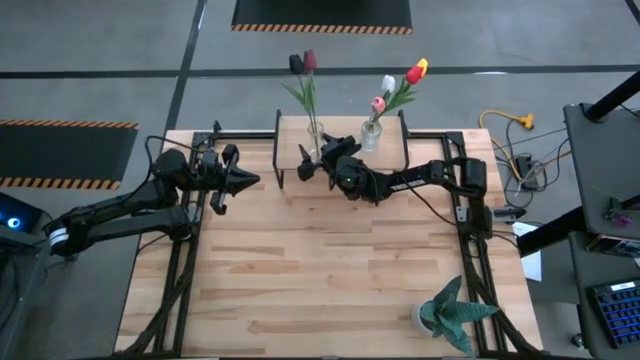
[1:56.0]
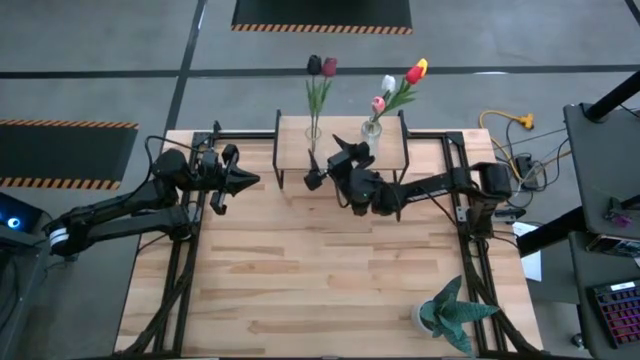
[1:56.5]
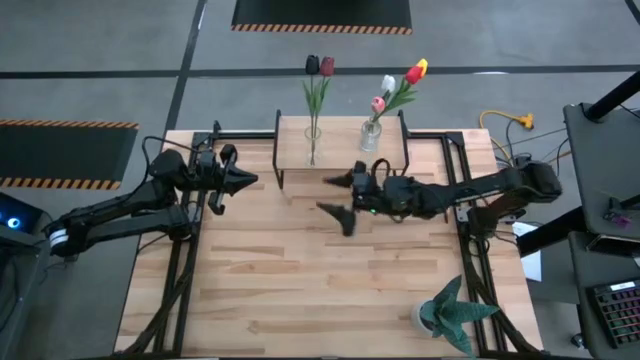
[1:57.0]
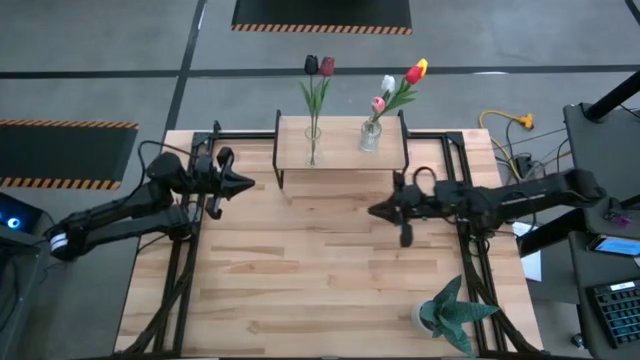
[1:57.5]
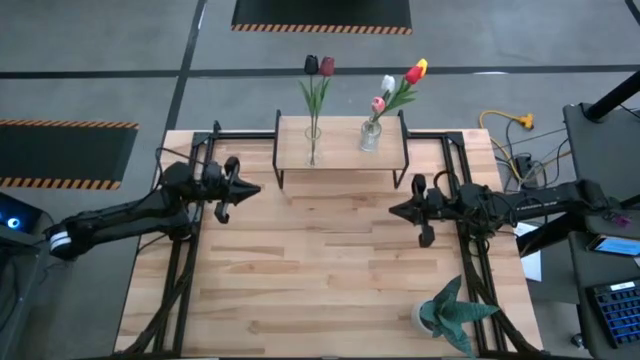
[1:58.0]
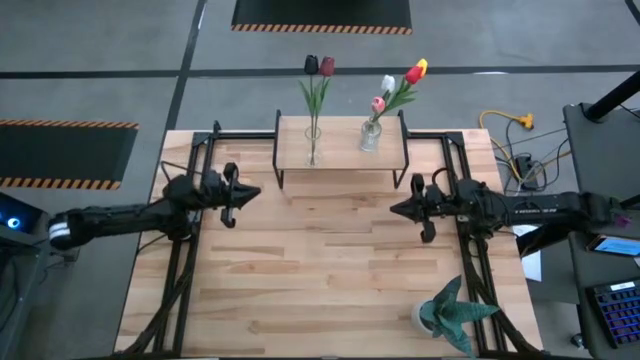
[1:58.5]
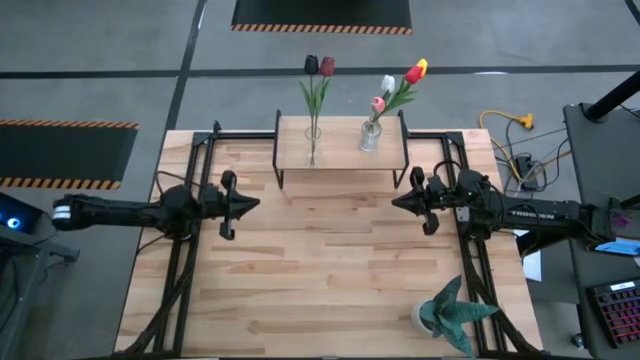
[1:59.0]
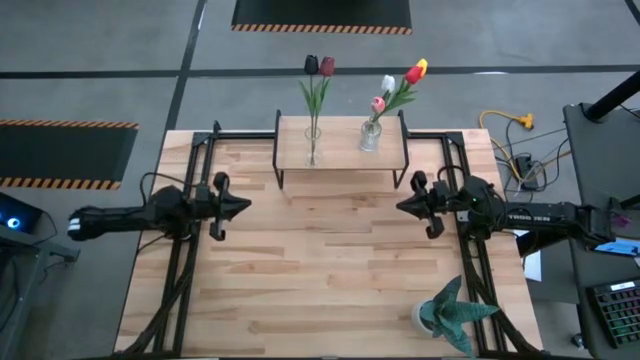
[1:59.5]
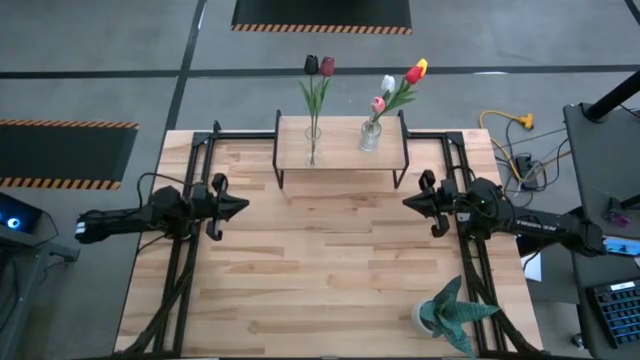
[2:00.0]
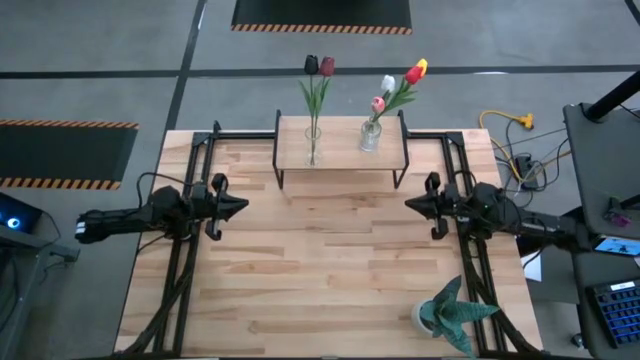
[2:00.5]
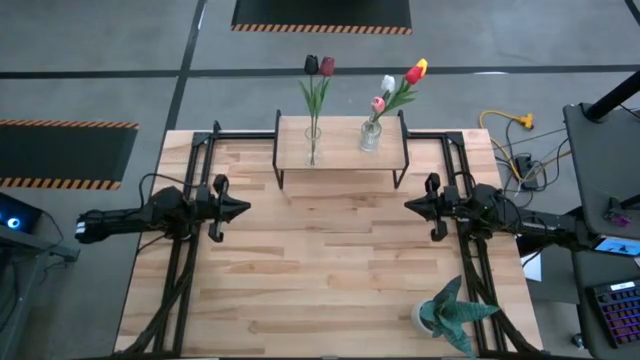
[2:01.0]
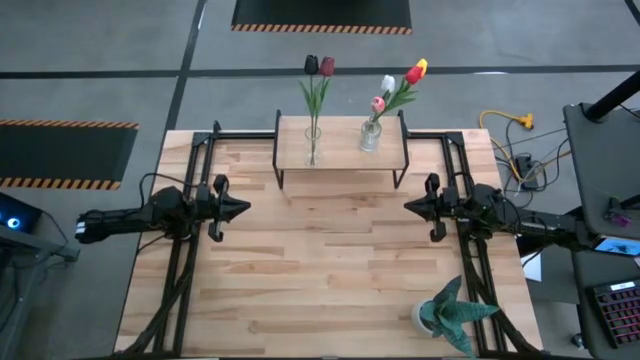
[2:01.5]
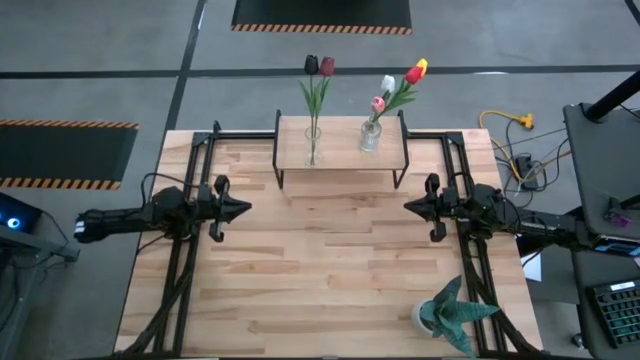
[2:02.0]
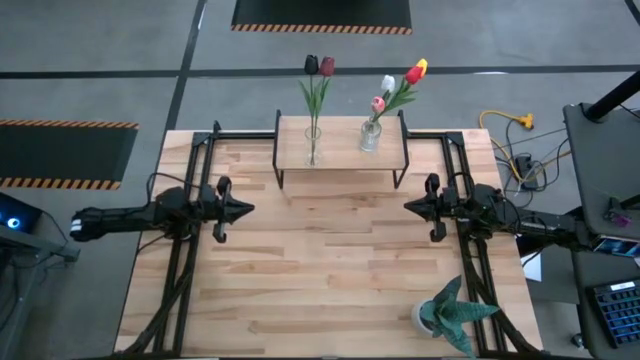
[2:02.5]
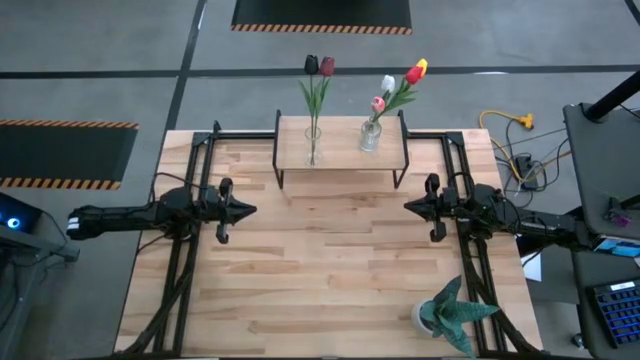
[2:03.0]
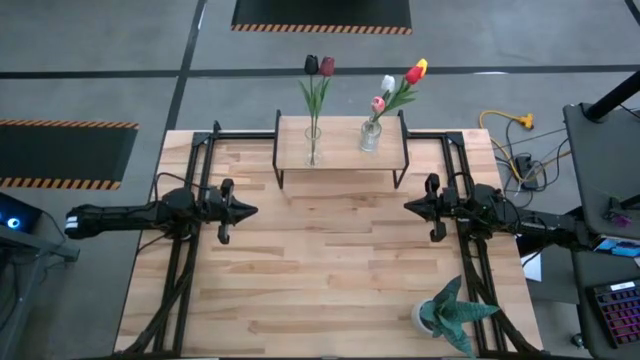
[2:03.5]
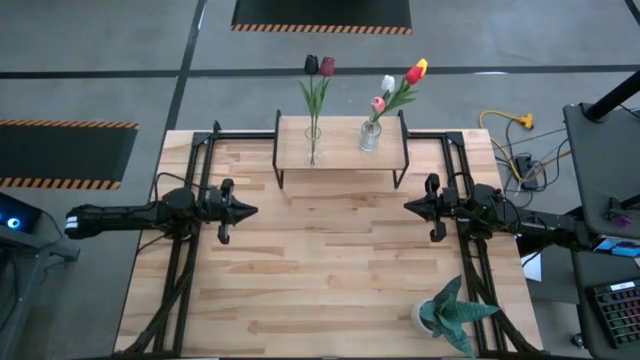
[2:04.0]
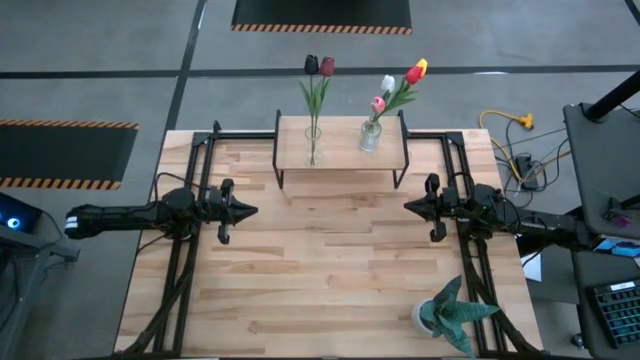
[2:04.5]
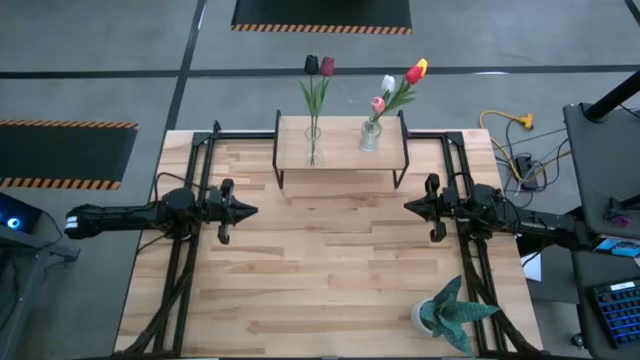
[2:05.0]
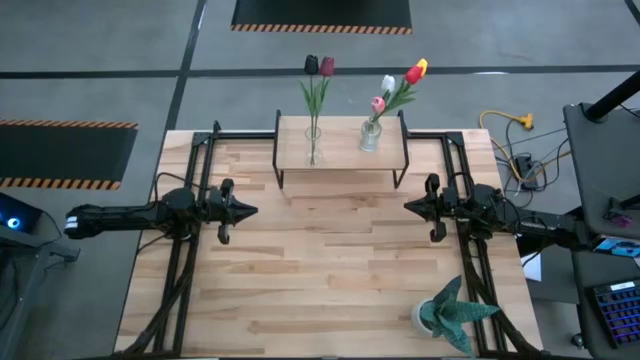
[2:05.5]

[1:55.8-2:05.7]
Task: Pick and place flowers into a vace then onto a shelf
Return to Home Position

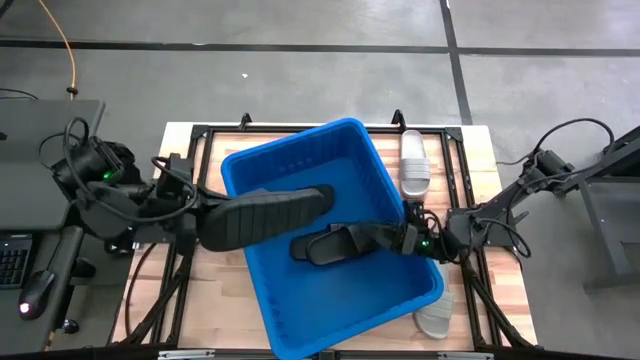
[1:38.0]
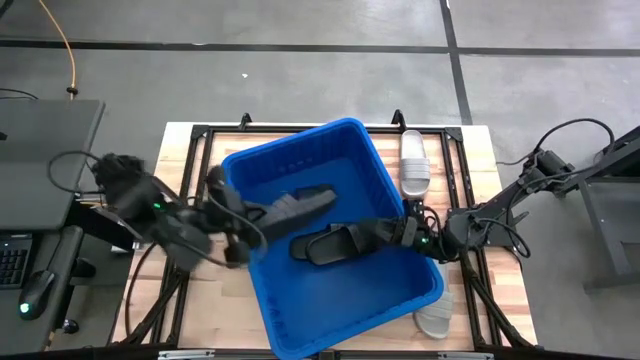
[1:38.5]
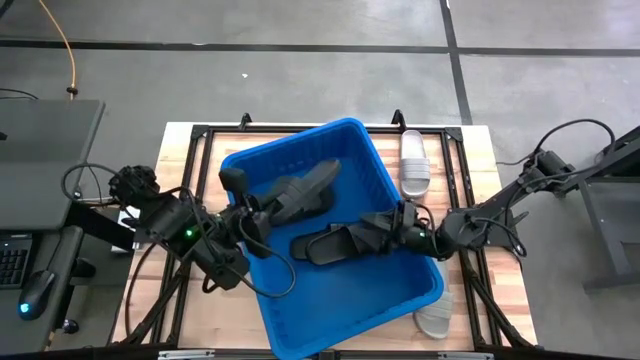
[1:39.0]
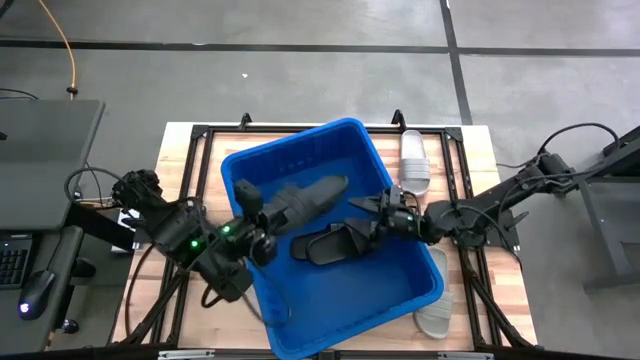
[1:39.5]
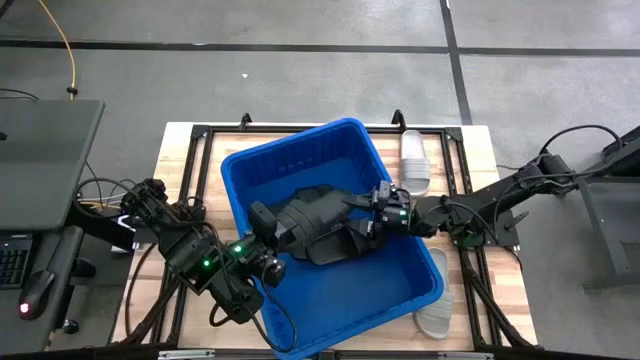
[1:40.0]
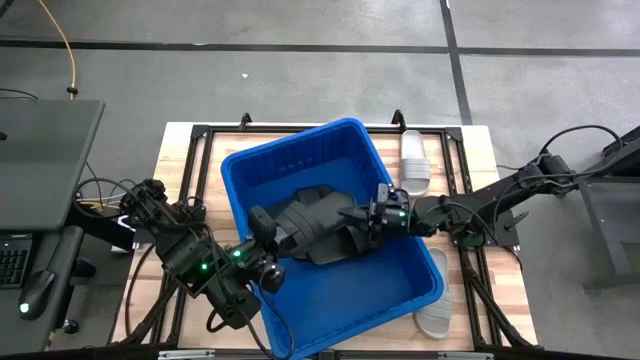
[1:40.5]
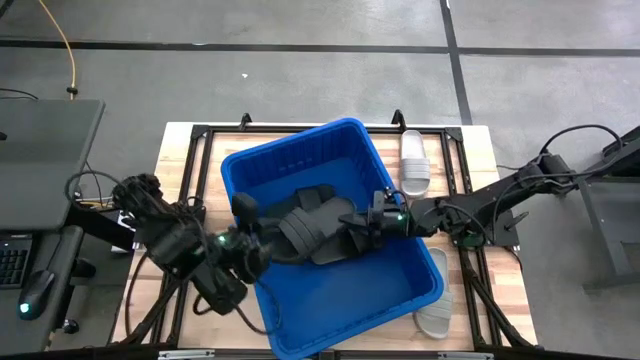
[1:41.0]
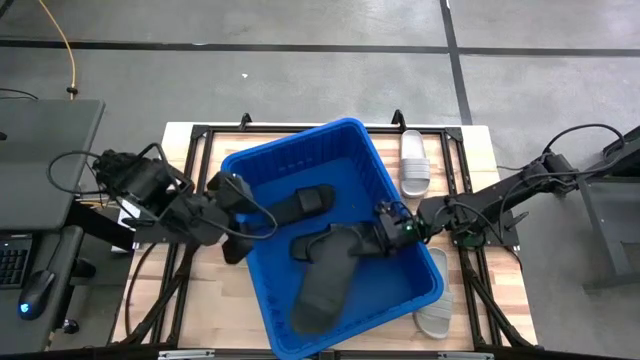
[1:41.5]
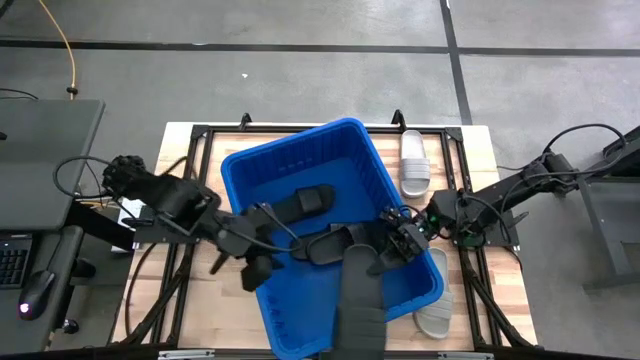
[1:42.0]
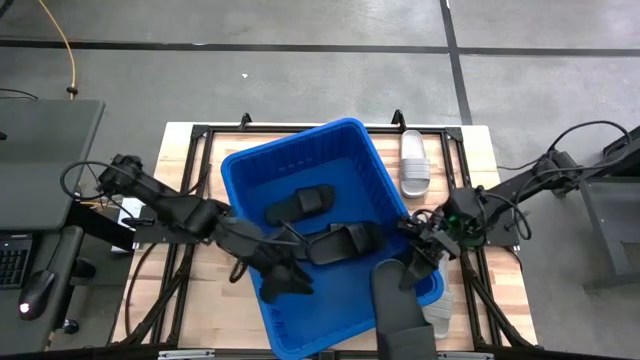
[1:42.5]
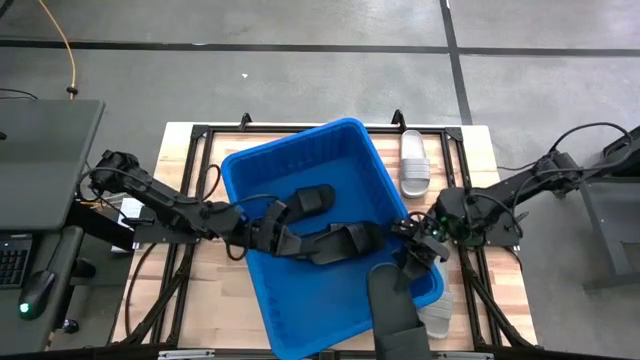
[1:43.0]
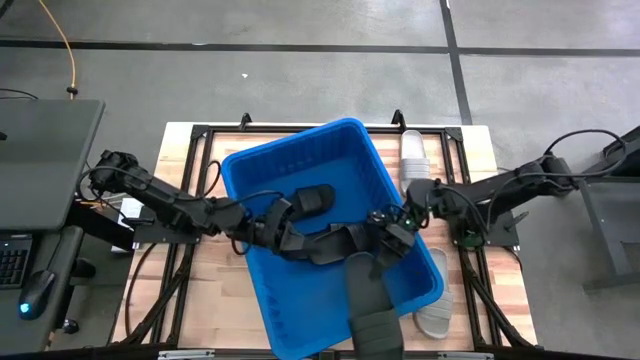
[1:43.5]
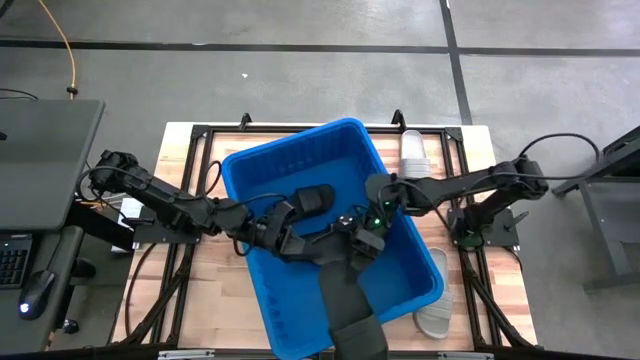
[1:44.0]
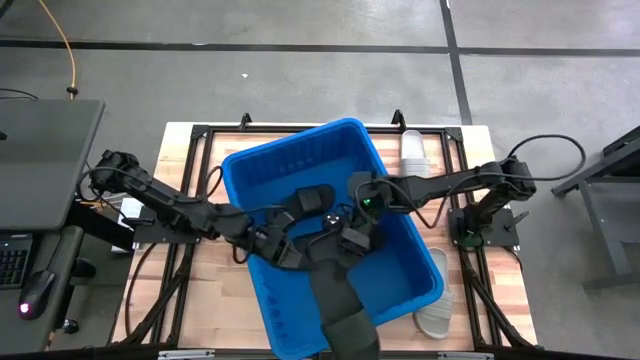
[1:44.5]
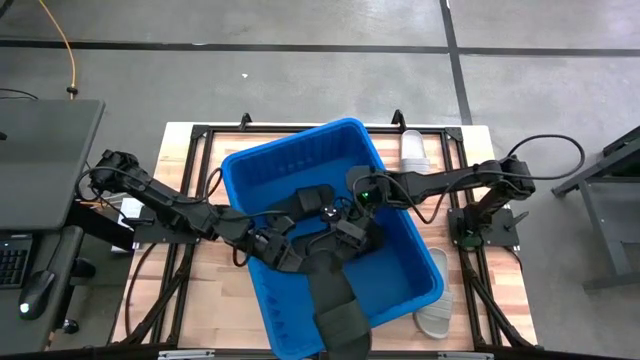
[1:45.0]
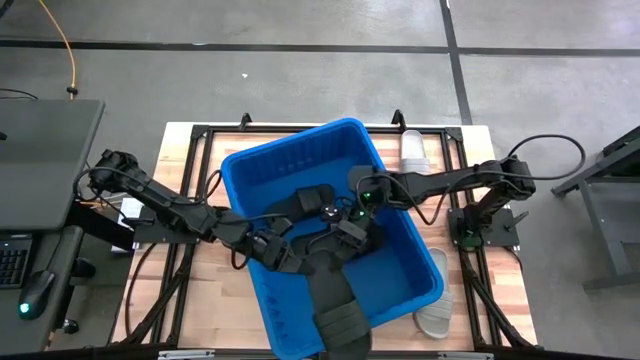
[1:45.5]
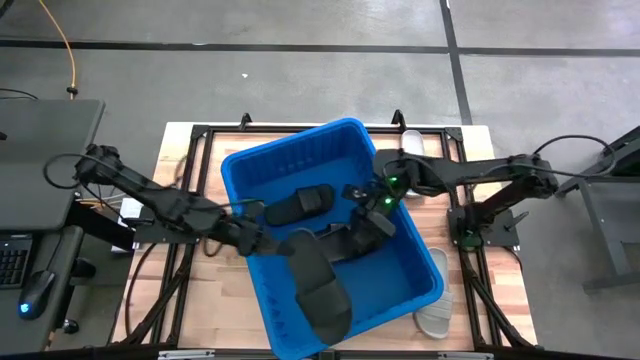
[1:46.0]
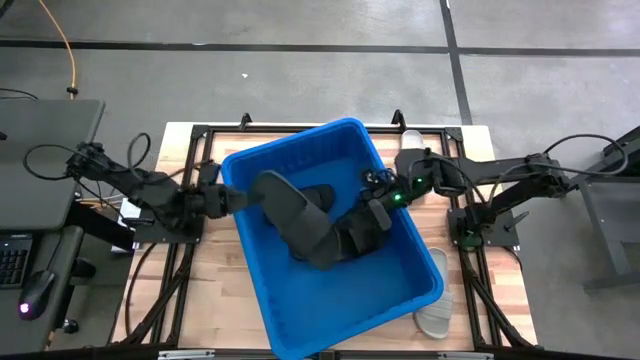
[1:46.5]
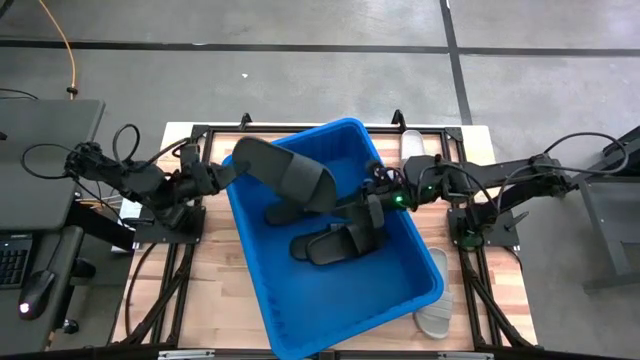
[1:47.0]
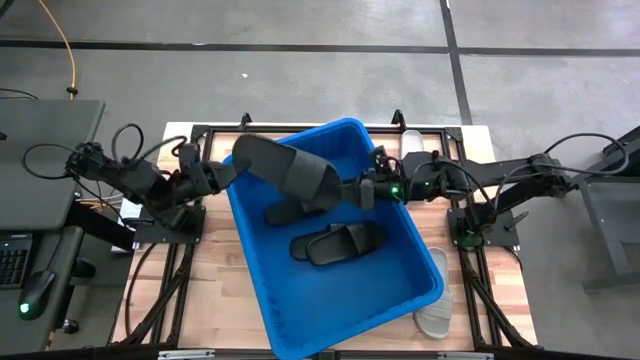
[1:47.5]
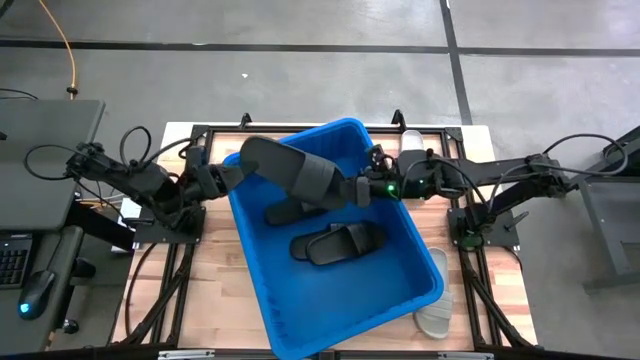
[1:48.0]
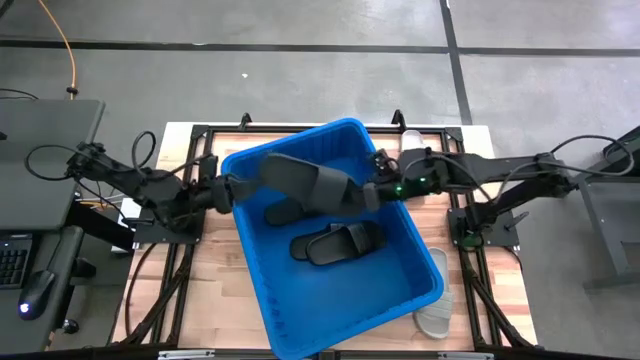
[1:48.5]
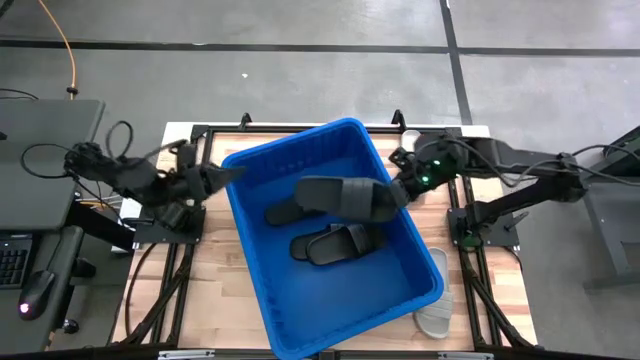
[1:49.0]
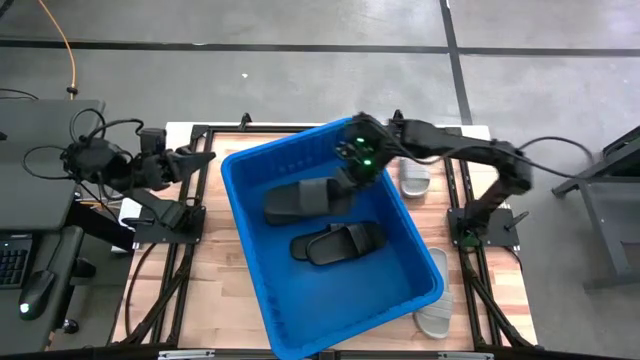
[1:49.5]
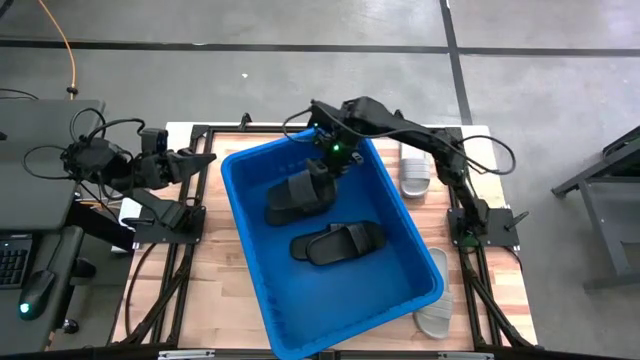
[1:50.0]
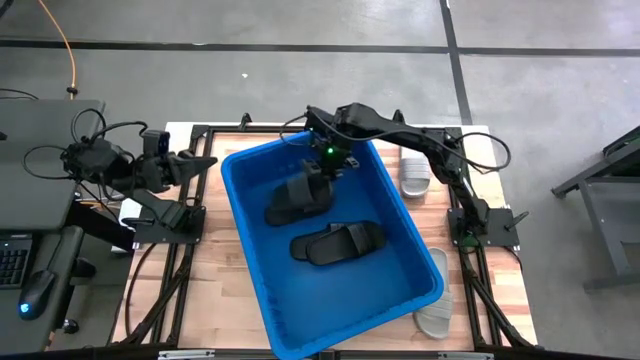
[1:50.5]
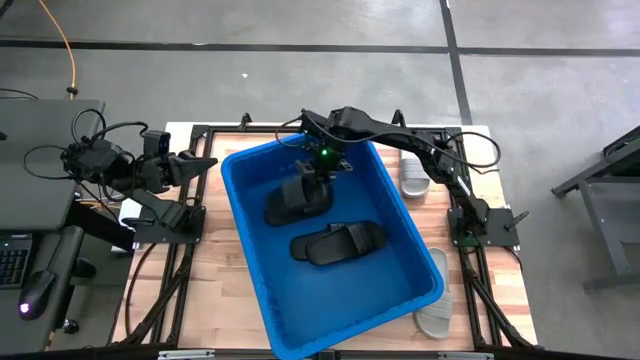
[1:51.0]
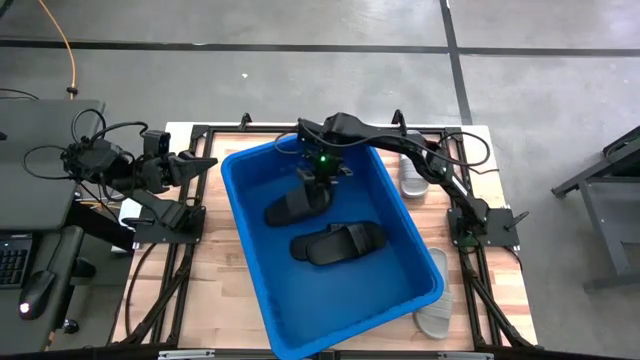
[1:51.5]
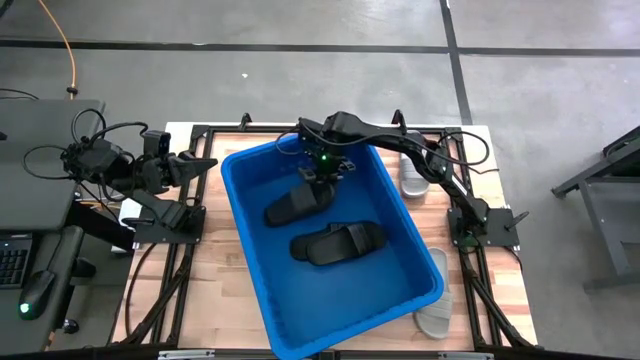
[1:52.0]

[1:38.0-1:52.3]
Task: Pick and place slides into bin
Put the black slide in the bin
